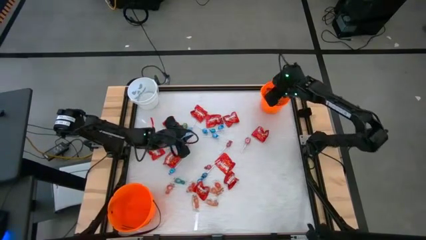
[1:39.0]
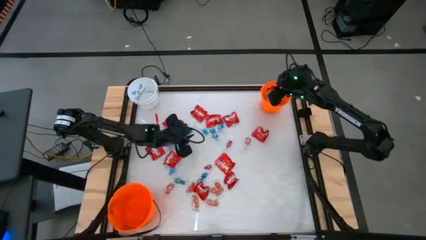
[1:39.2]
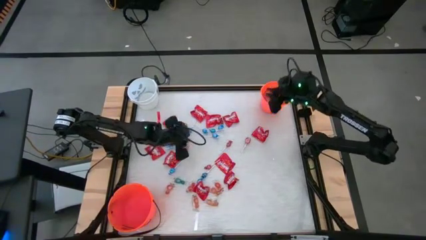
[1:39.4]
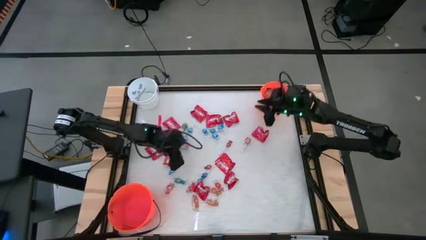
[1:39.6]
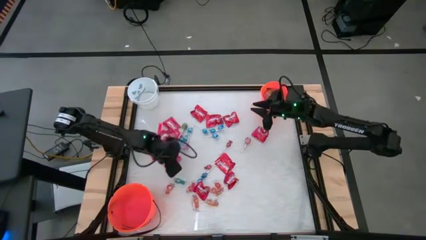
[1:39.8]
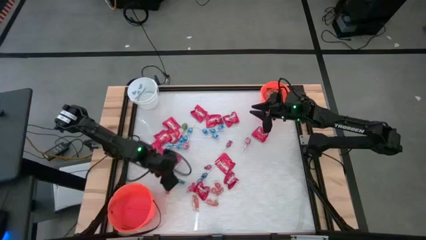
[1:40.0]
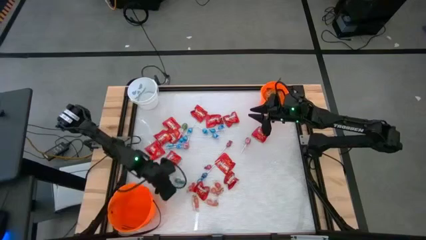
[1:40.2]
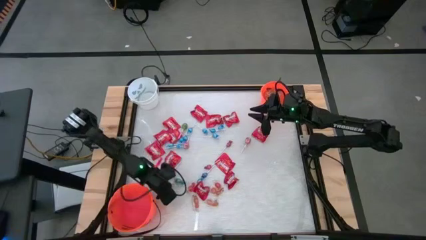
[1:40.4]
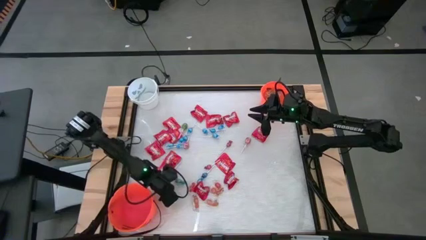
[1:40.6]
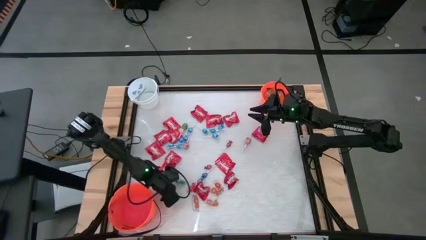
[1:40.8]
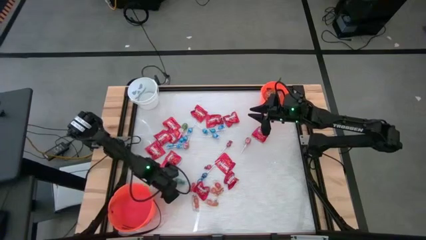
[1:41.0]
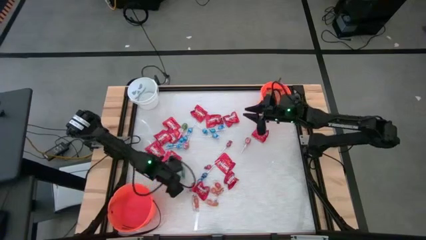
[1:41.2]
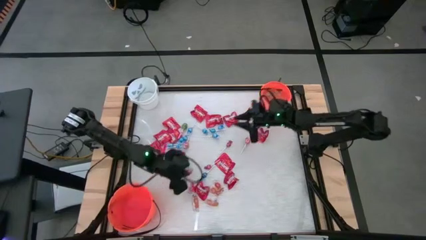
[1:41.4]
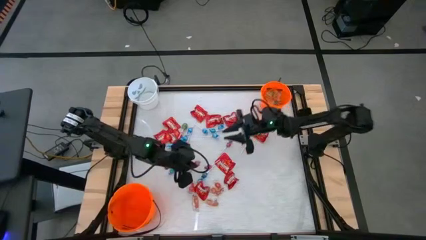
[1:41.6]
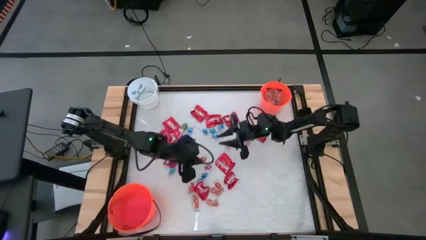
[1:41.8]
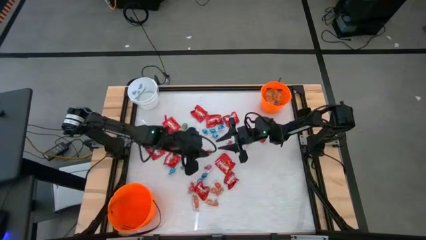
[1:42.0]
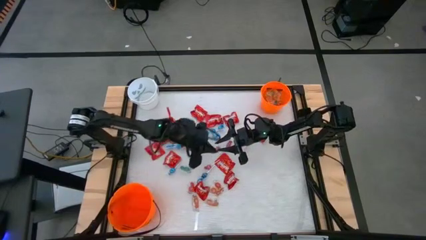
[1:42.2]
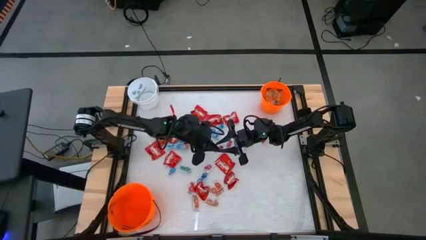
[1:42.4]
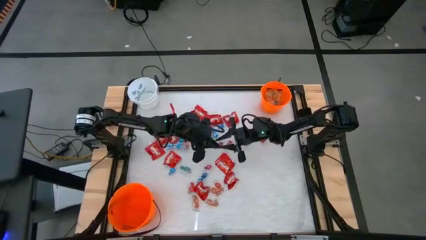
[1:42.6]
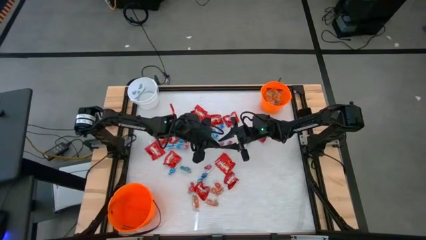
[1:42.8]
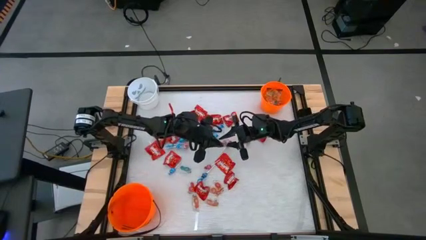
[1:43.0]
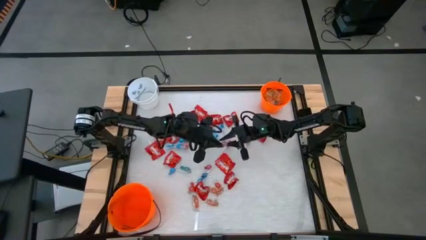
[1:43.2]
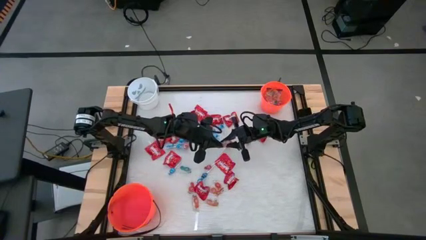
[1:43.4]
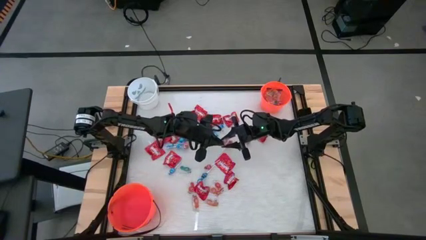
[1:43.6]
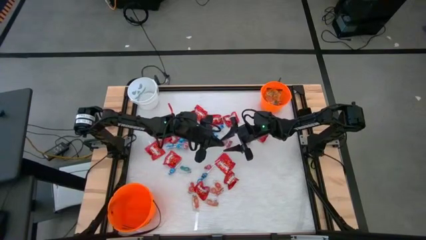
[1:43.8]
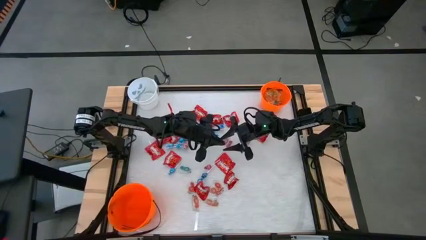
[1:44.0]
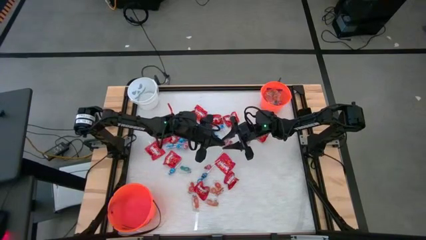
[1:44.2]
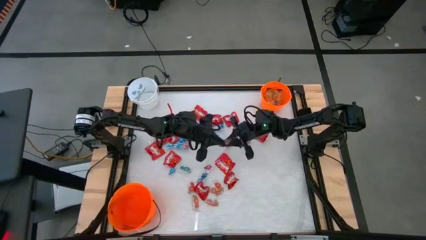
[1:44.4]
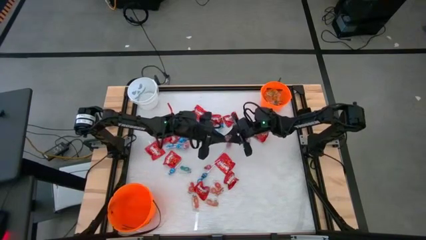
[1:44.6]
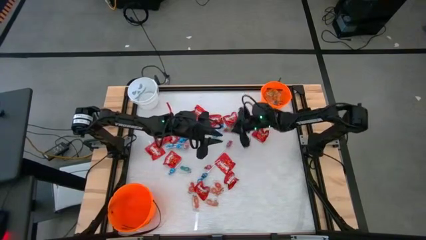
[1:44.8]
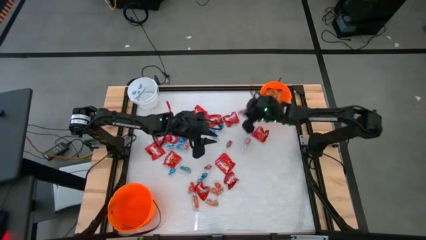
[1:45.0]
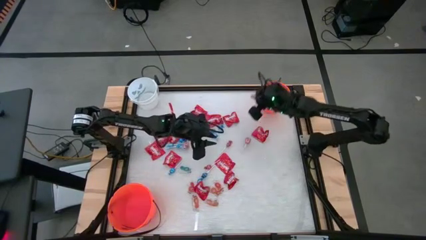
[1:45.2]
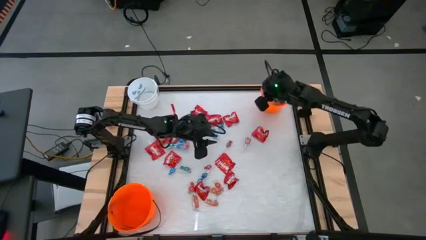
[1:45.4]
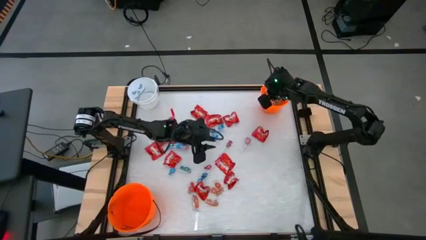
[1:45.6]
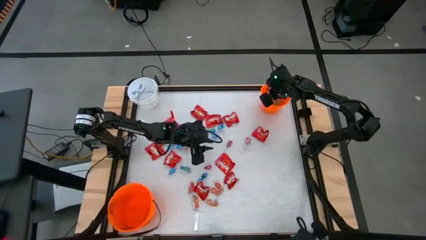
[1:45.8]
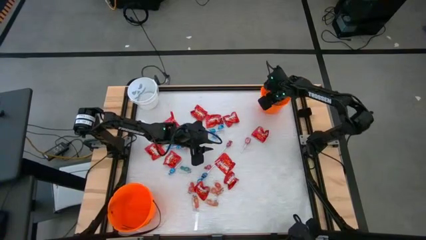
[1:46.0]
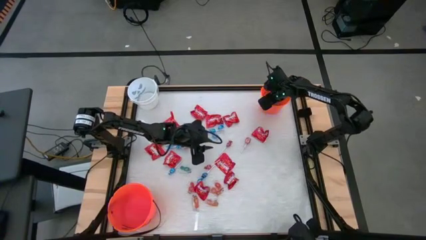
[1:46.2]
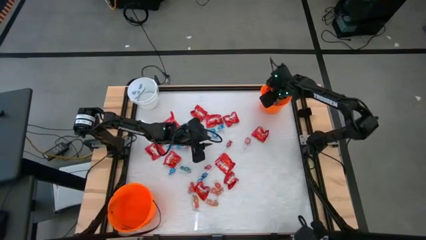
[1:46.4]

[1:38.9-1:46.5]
Task: Sort candy by brand, put in halloween buckets
Put the left red gummy into the top orange bucket

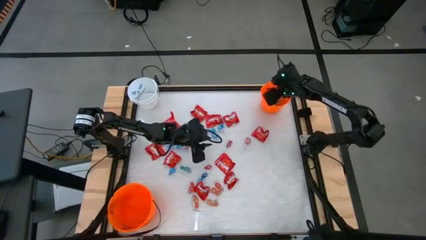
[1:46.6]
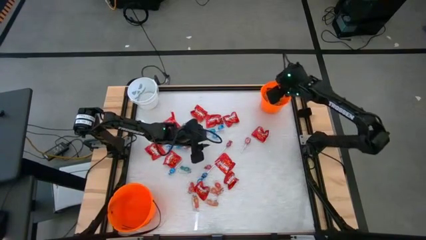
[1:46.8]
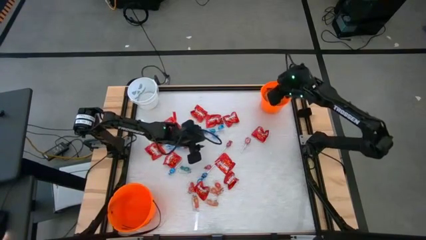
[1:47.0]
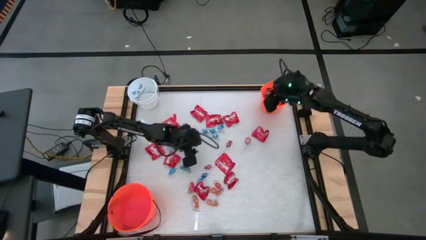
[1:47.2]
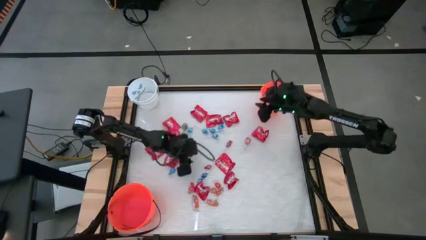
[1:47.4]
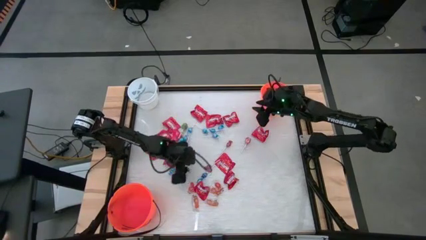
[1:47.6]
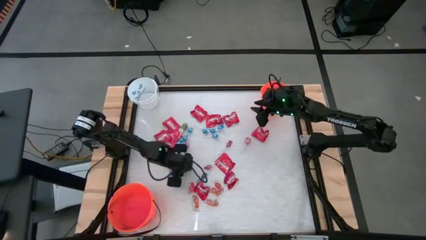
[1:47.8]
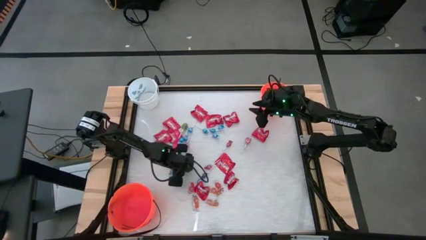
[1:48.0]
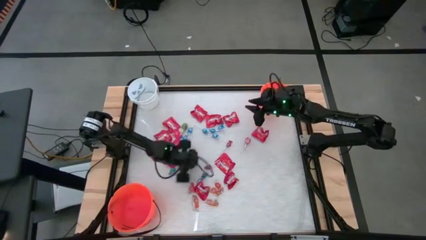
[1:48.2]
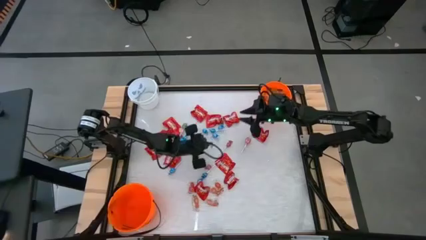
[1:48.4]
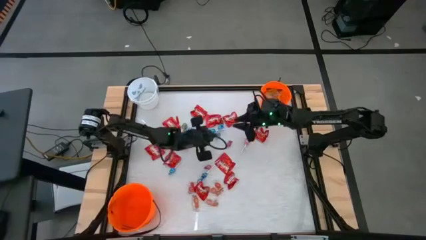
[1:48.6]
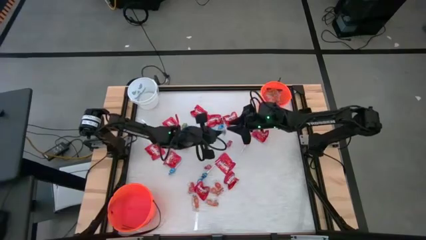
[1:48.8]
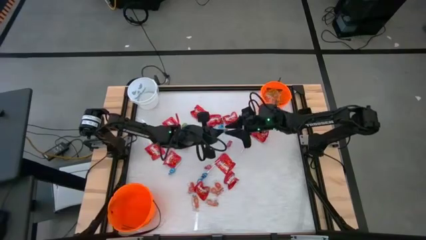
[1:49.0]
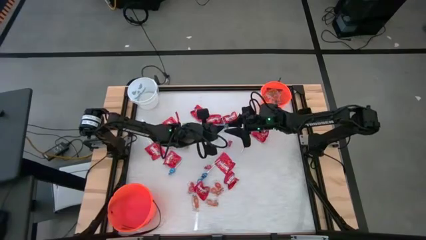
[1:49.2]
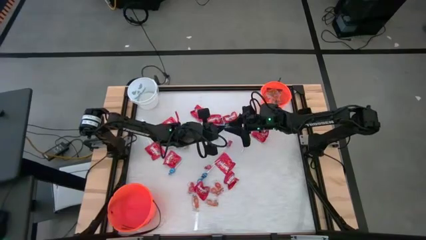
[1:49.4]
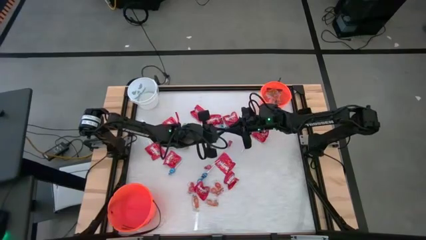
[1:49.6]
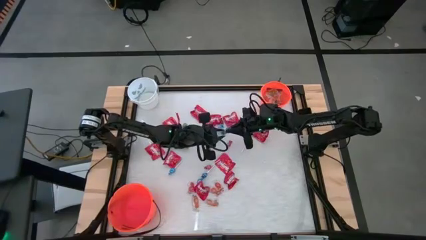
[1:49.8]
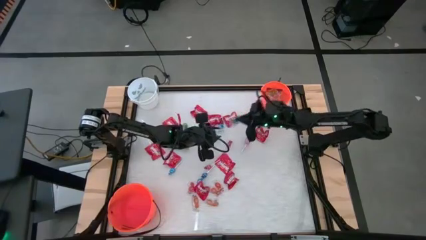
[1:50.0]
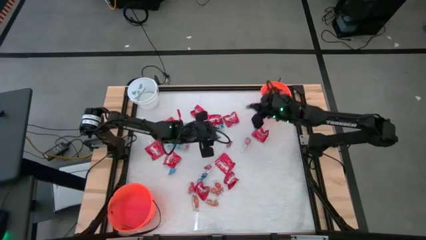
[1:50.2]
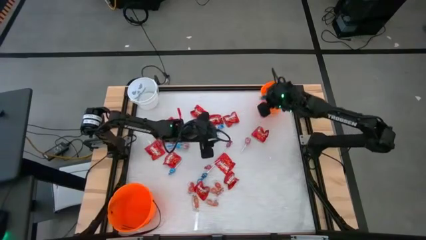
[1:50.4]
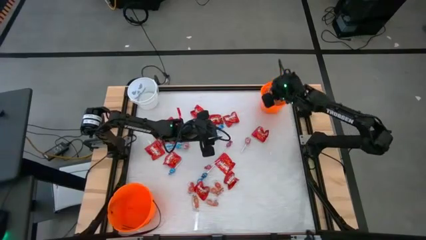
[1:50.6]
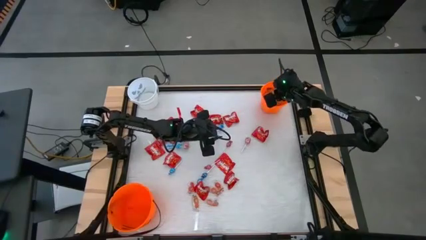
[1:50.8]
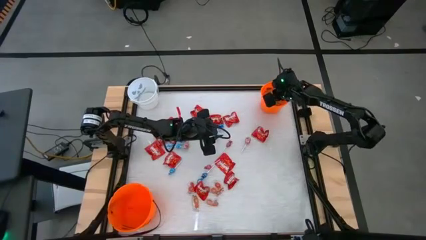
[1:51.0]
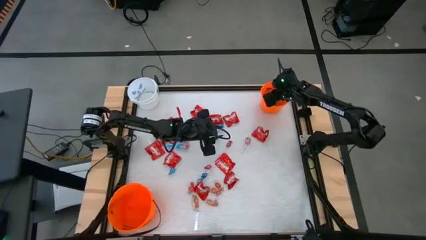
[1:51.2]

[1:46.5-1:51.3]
Put the blue gummy into the top orange bucket

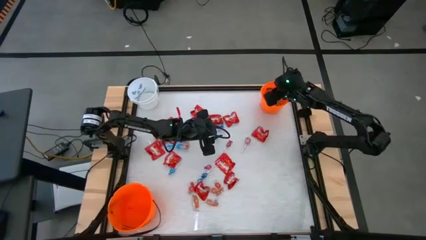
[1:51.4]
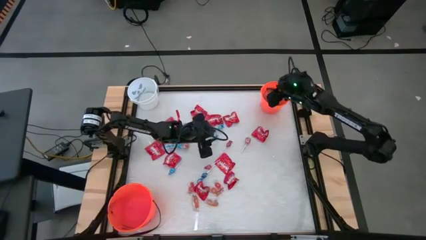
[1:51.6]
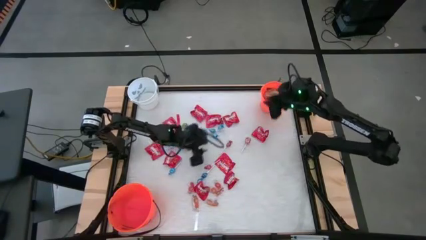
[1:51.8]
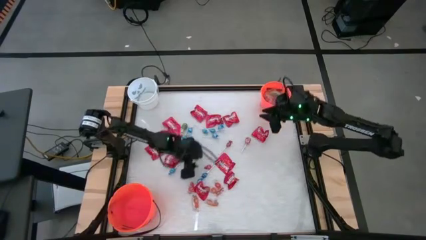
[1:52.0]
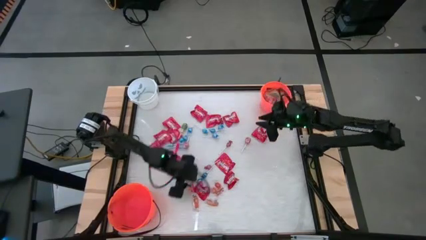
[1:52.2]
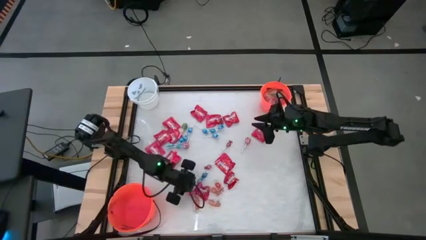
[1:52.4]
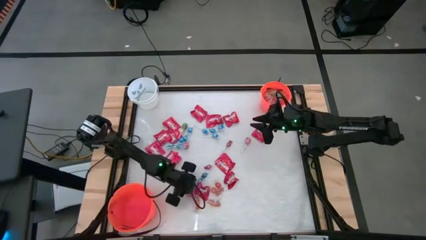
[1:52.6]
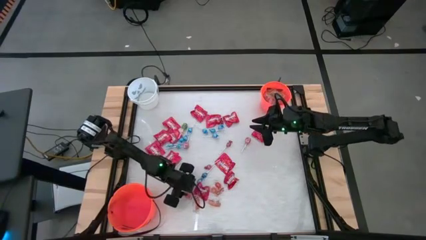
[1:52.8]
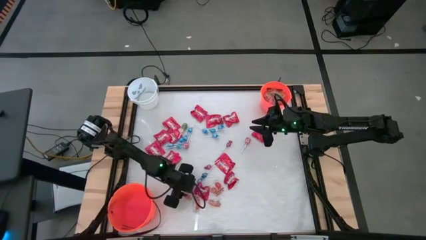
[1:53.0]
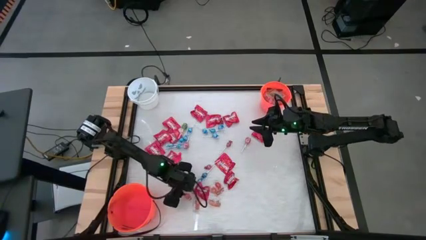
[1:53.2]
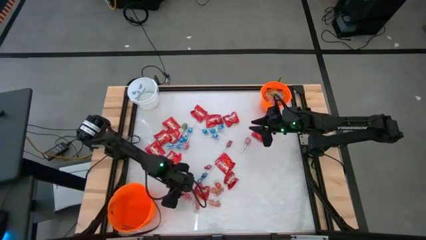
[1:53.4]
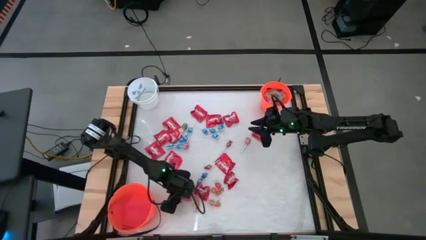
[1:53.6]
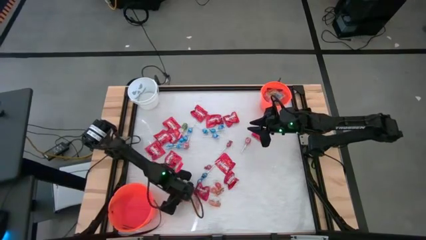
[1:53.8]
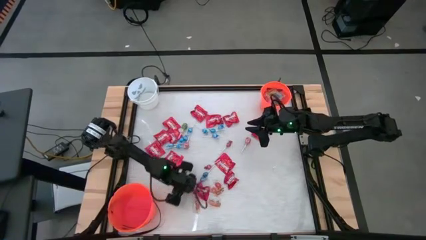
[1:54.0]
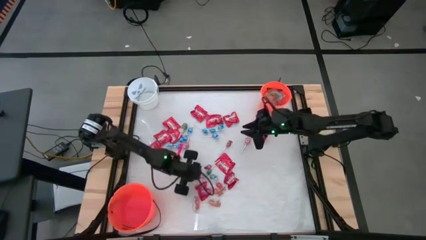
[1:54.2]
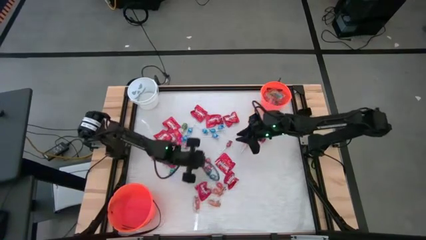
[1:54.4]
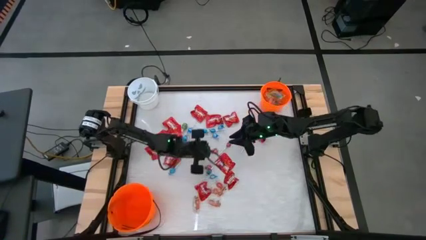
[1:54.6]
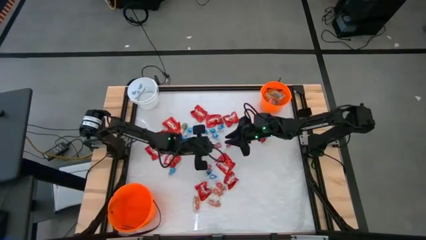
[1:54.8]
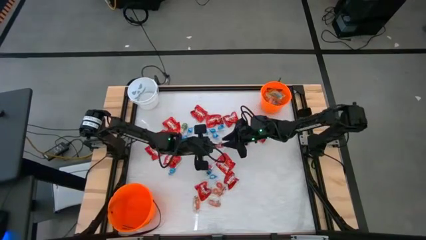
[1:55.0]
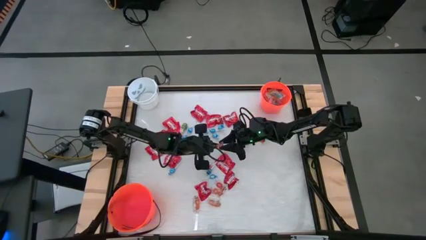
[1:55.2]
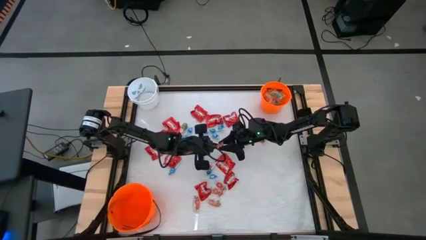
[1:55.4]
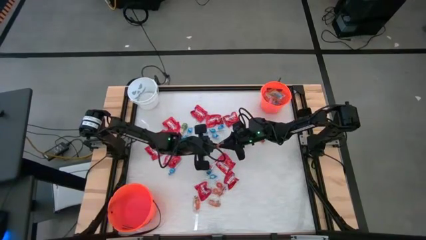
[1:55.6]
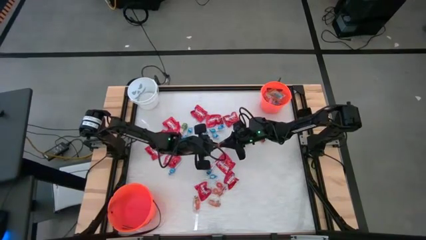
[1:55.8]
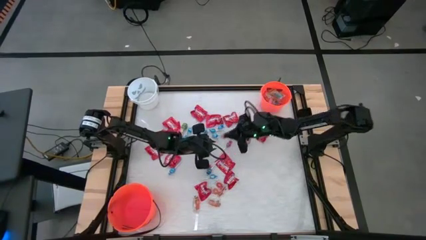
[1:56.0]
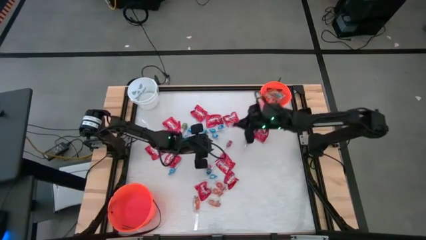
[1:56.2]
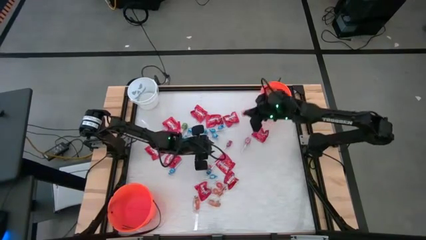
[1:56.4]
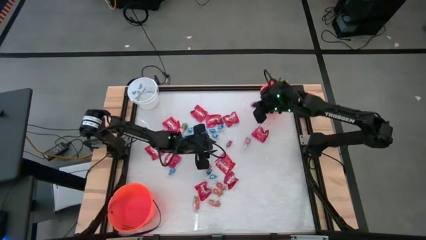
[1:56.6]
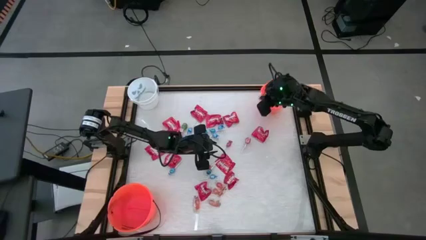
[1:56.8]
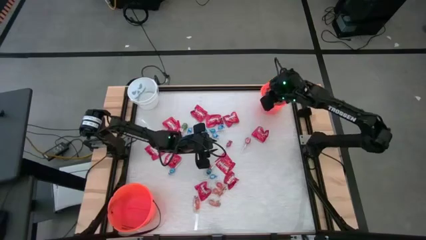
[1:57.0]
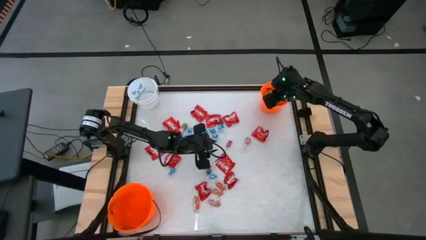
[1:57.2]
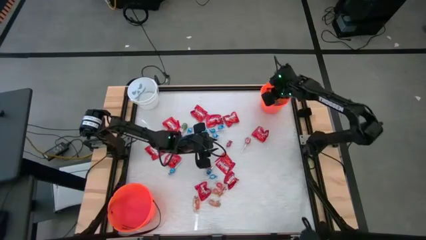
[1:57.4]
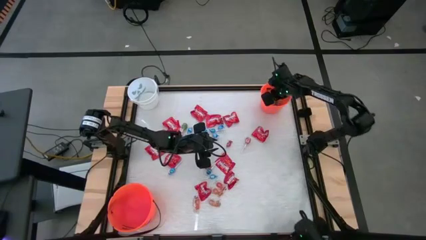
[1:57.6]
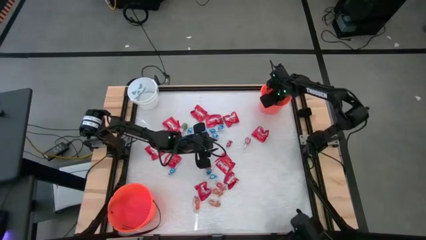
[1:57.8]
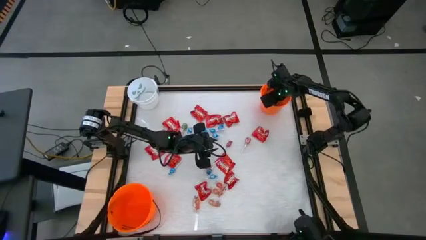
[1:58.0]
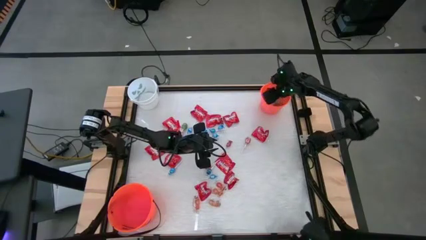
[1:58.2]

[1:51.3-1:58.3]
Put the left red gummy into the top orange bucket
